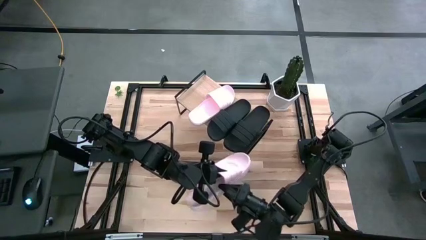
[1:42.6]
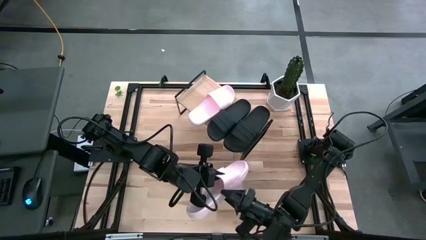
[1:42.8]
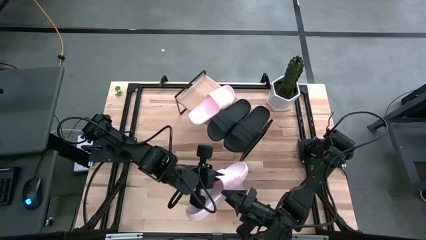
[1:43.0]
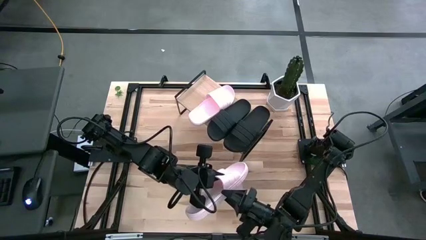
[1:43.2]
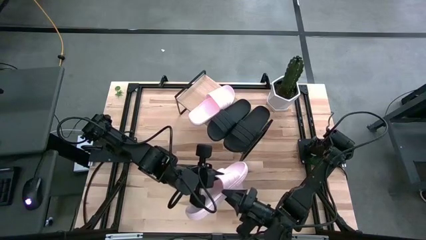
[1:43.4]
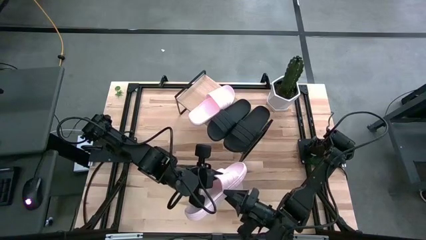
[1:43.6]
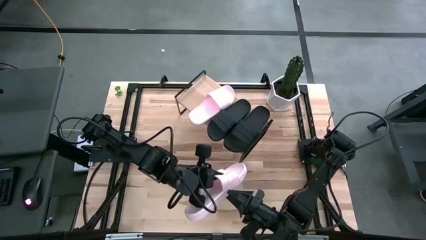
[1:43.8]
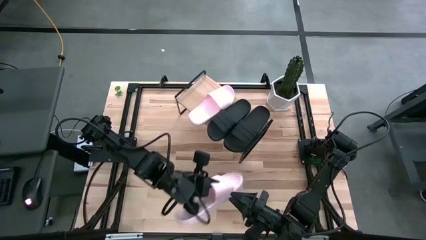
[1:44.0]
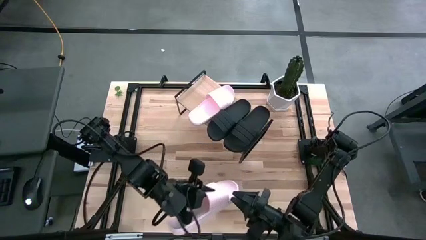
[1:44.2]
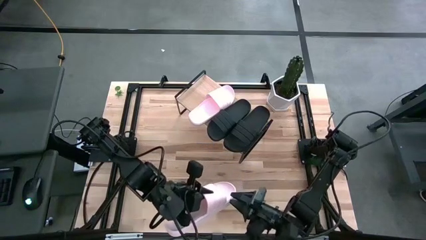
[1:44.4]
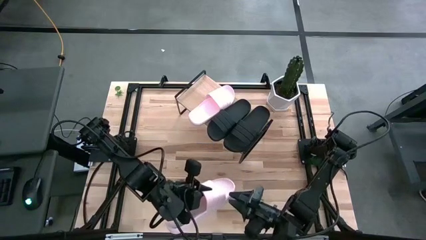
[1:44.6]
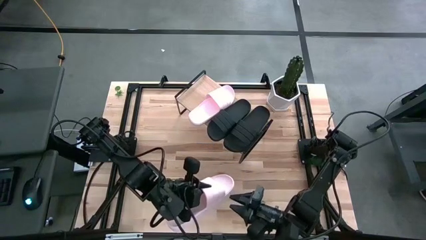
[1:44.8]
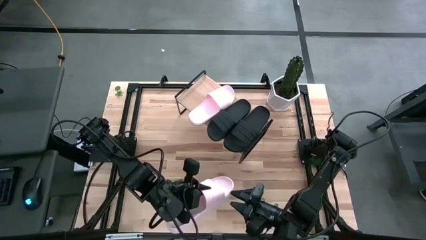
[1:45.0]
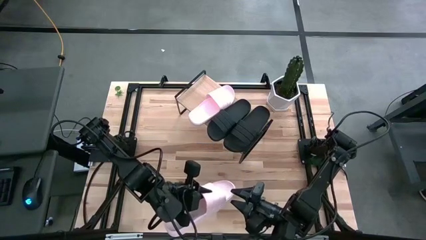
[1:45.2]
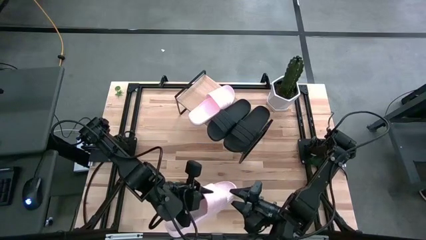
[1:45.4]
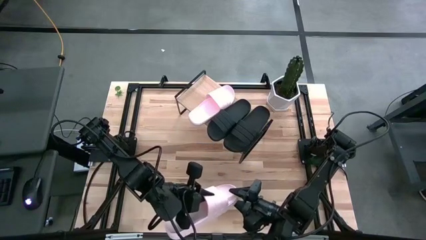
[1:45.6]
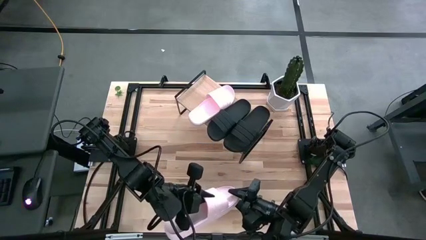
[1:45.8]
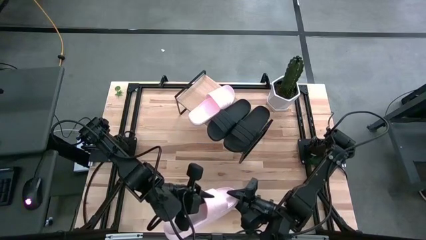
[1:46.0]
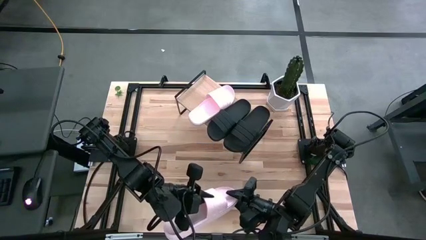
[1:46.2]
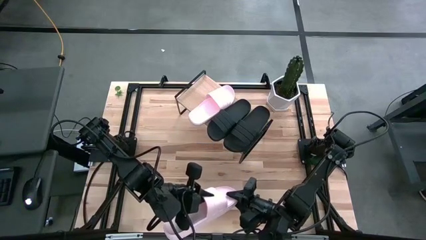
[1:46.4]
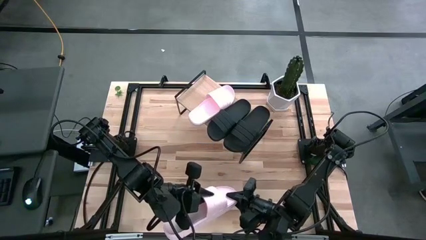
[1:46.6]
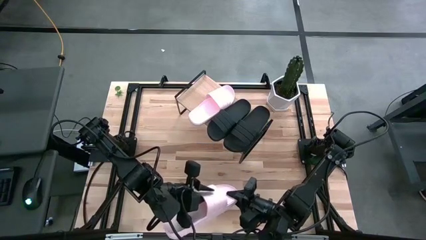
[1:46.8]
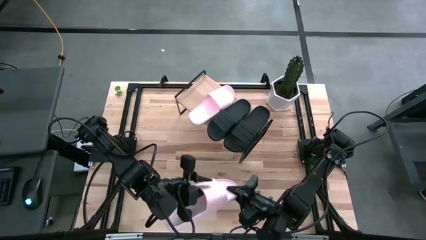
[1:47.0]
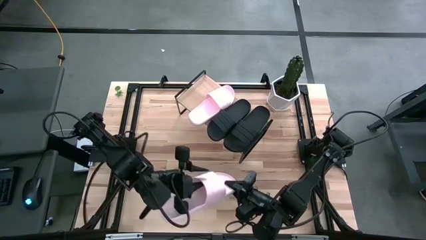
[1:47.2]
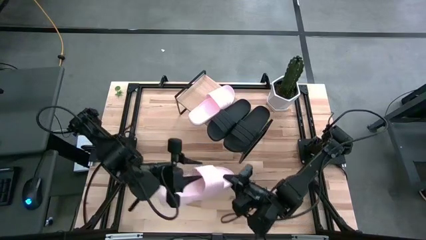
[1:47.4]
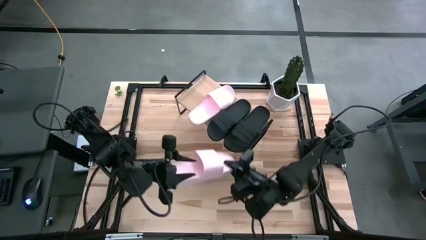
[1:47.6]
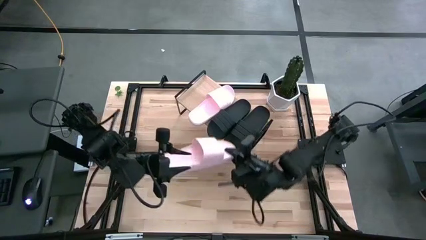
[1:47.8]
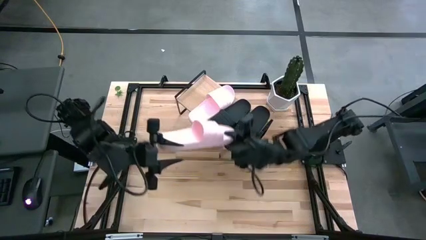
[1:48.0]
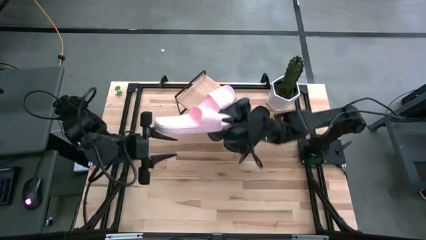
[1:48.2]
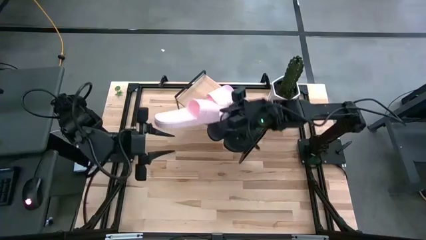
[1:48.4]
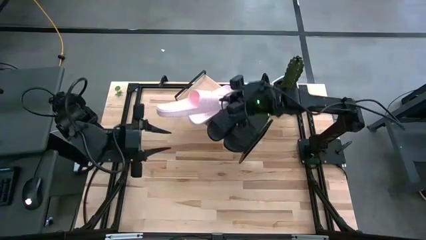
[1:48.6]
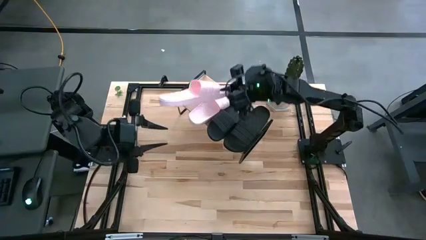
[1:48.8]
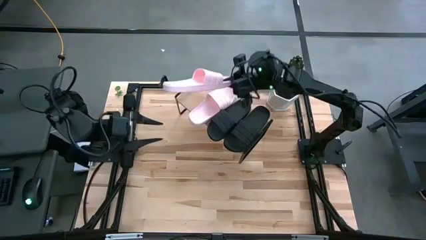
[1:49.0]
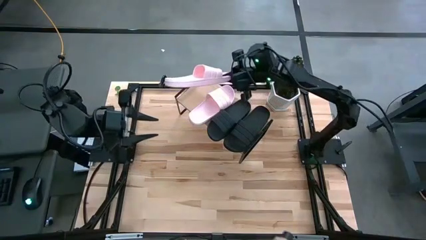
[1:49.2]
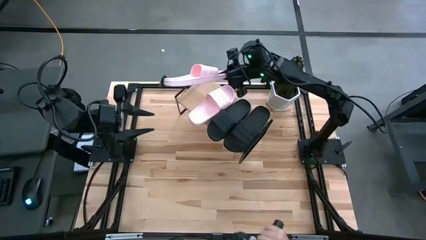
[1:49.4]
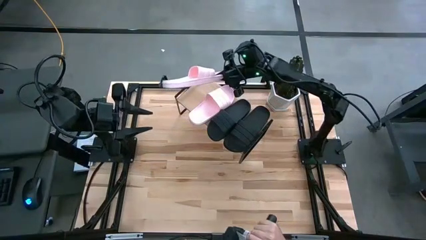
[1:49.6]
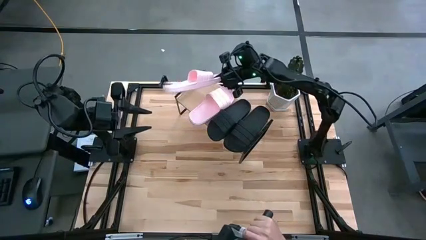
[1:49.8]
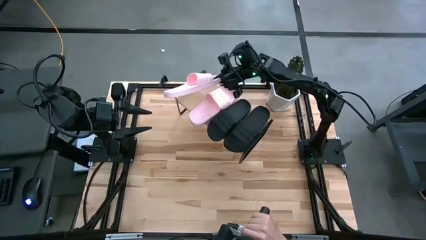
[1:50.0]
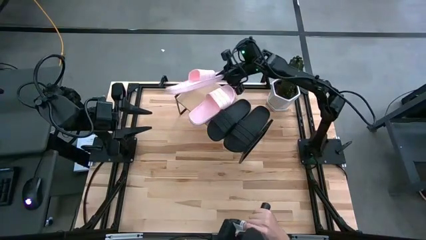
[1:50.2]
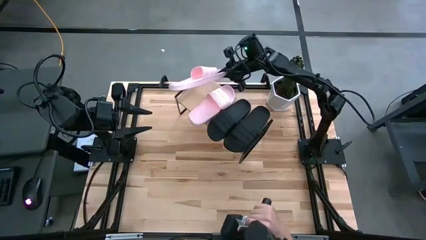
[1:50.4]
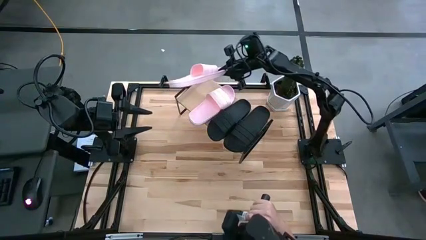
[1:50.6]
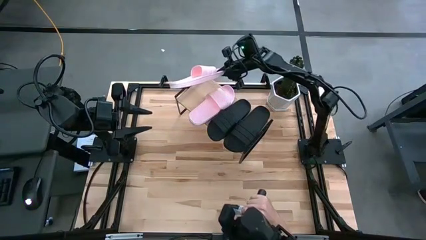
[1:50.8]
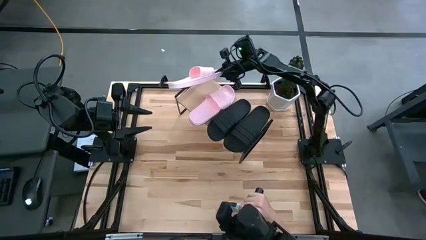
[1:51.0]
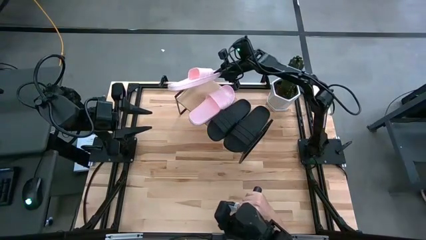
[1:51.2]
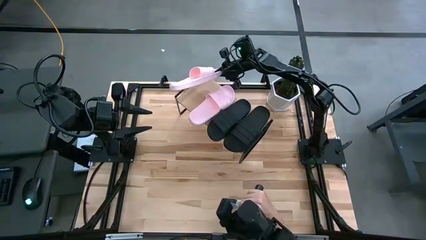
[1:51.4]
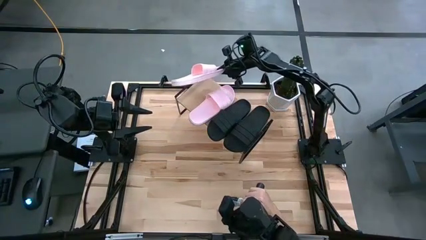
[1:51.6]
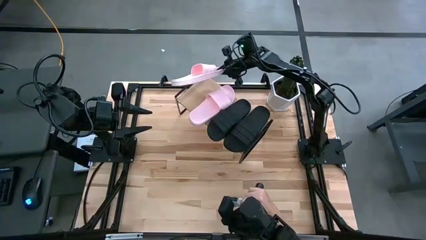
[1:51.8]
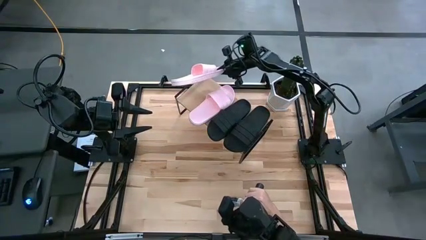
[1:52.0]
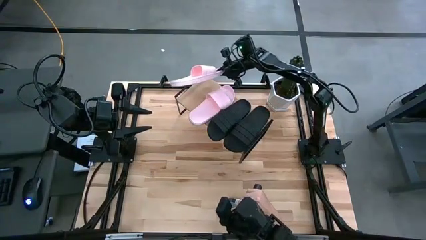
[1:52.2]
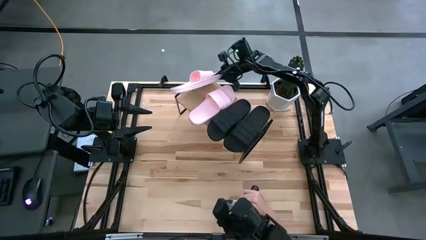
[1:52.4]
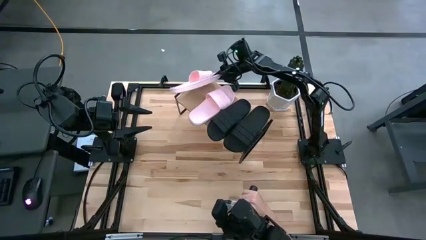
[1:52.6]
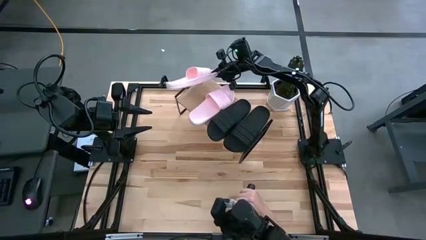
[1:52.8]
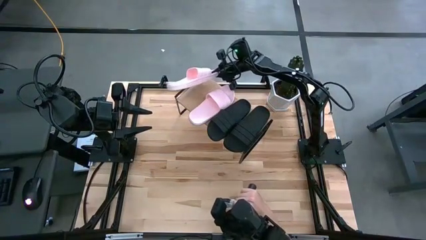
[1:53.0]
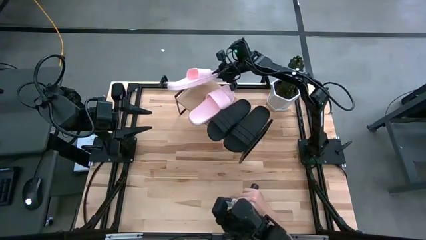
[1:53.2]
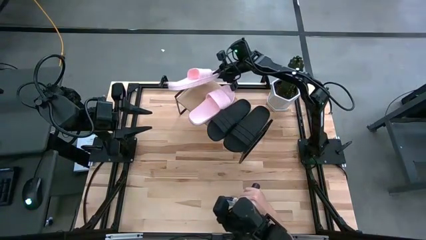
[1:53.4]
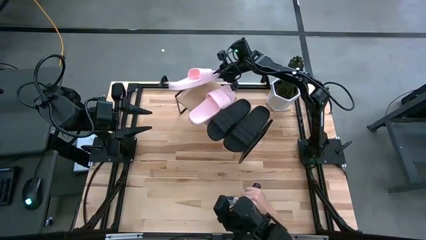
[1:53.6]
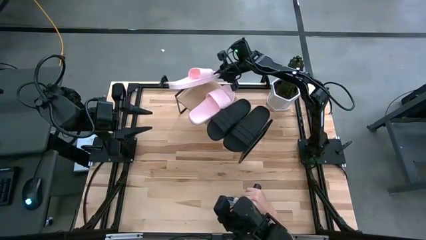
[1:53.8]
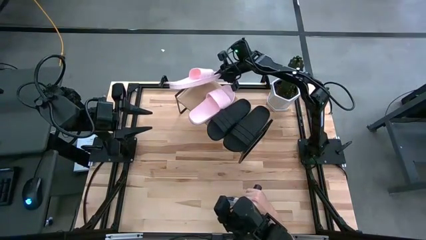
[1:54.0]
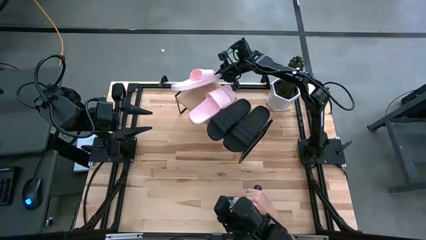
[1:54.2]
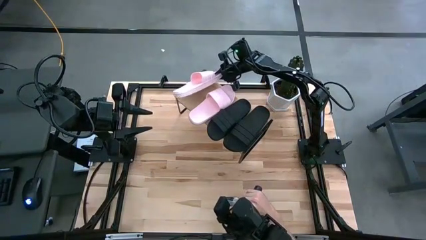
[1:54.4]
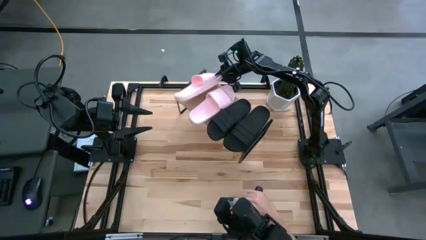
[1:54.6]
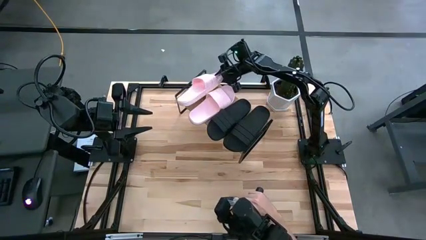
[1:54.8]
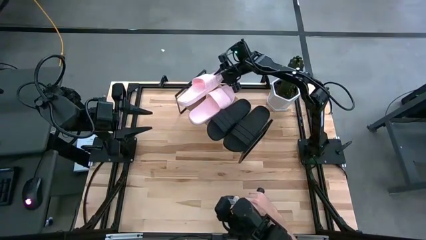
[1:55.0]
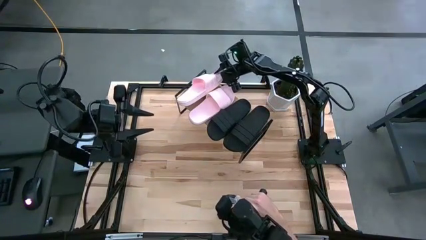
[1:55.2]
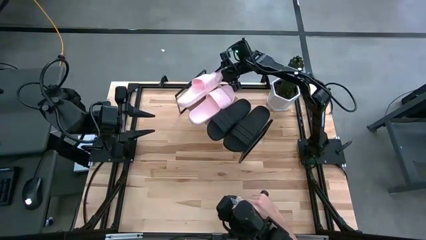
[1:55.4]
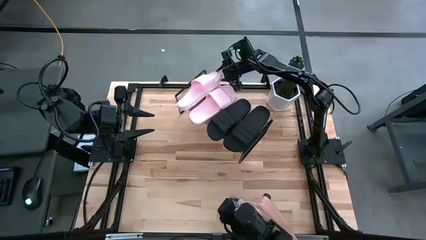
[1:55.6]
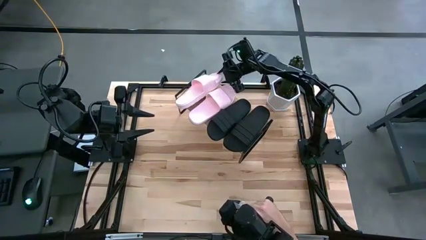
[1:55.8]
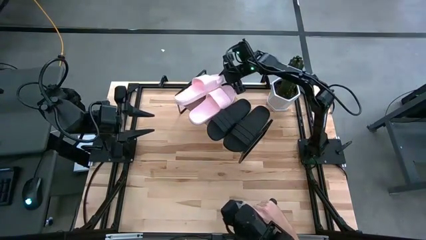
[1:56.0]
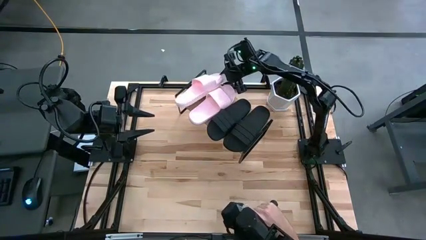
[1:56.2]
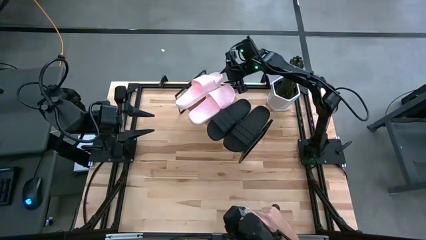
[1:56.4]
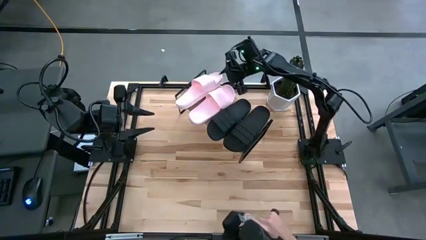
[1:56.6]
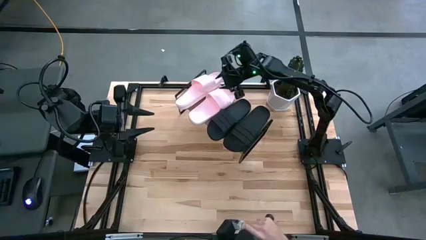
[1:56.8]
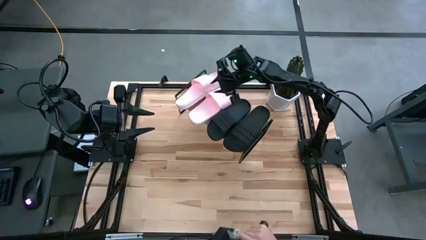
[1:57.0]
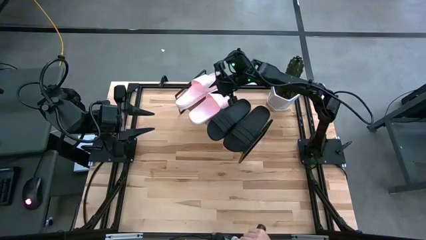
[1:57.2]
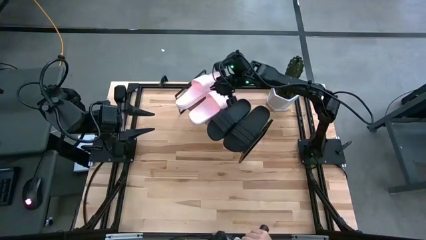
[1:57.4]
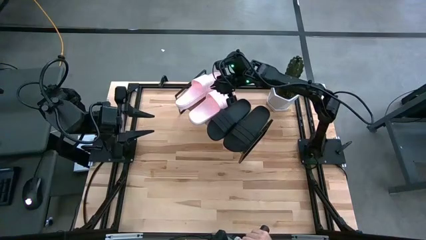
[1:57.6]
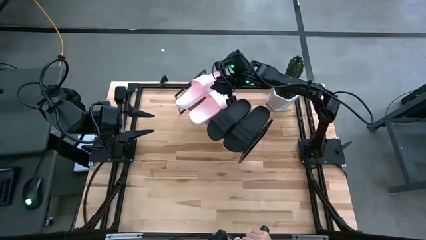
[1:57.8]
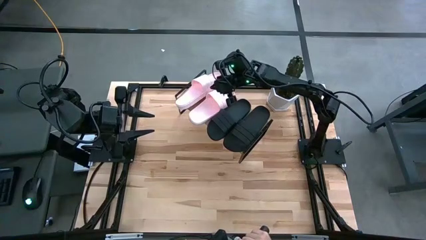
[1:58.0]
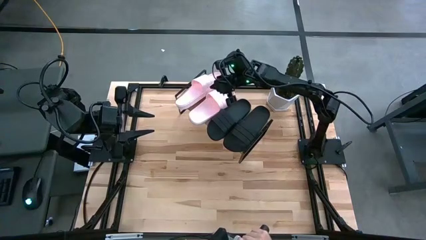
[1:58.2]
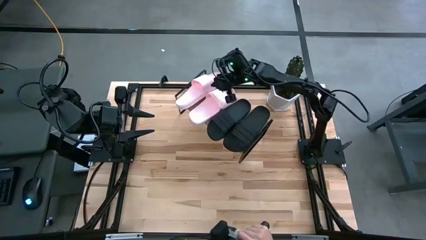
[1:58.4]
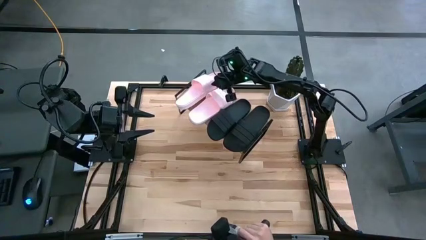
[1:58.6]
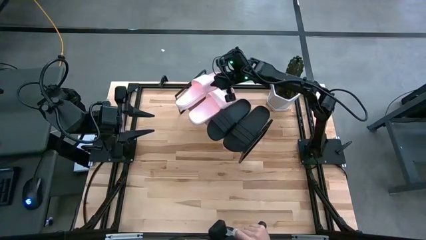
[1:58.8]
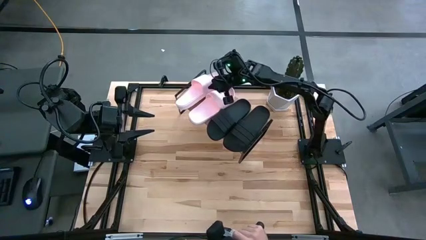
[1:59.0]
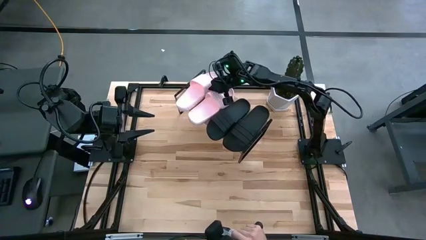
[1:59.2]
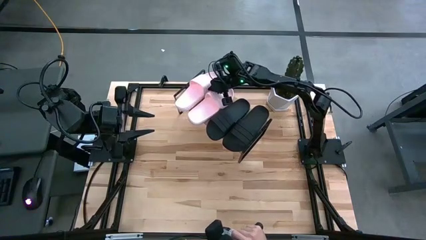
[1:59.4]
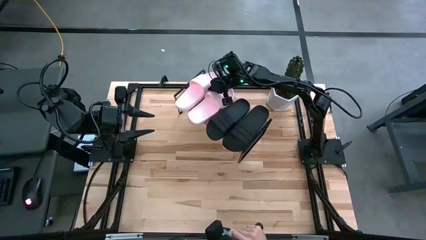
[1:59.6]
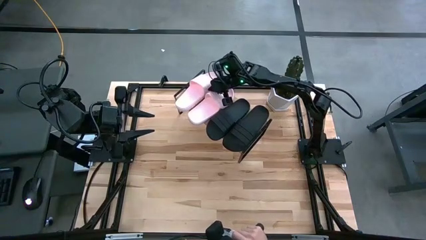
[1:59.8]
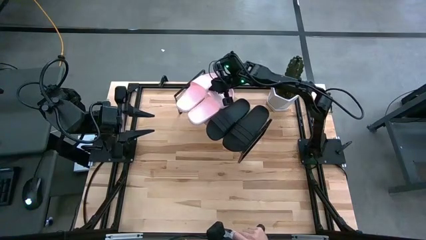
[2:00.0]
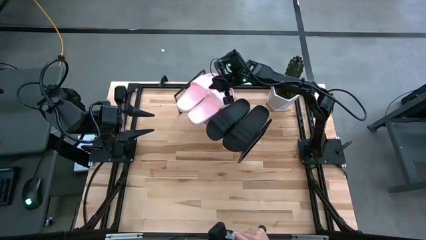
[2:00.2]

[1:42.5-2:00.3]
Task: Pick and place slides into the shelf
Put the pink slipper on the shelf
